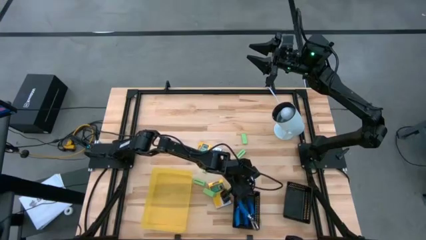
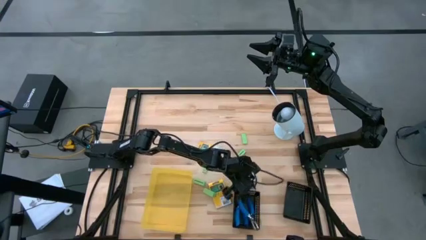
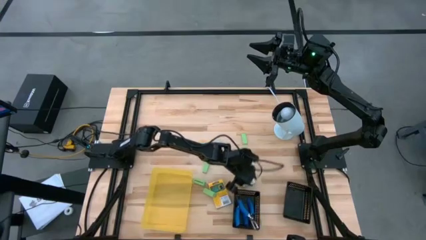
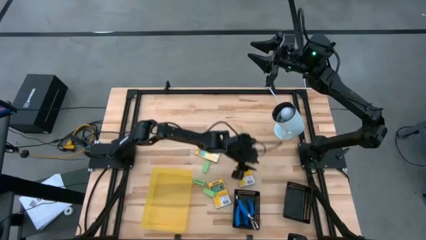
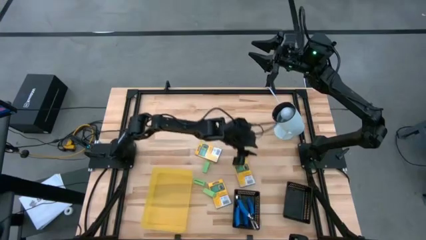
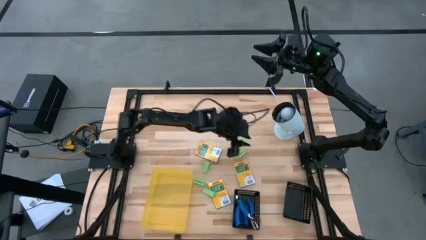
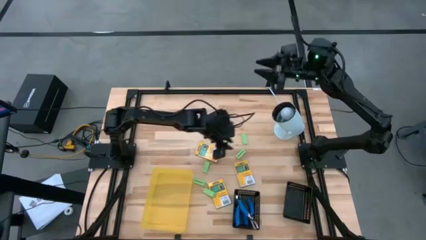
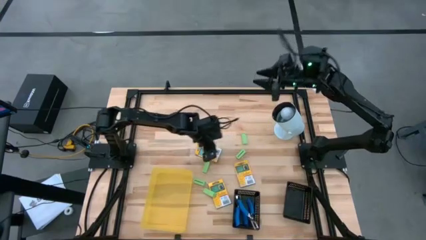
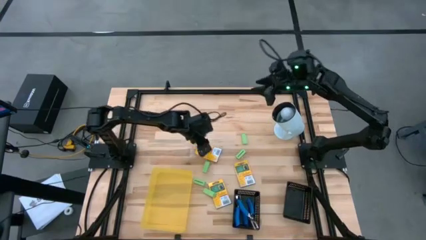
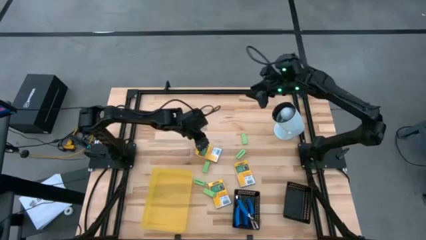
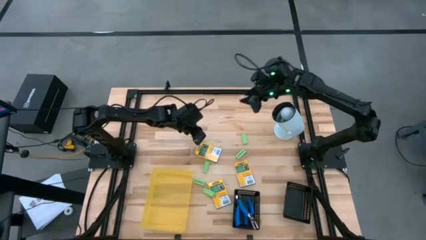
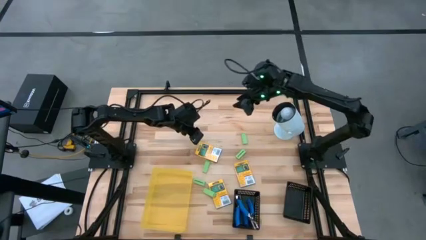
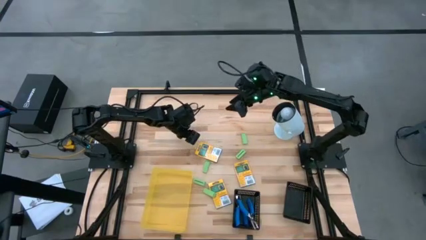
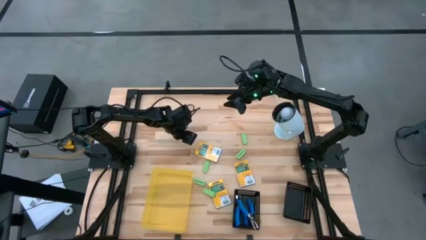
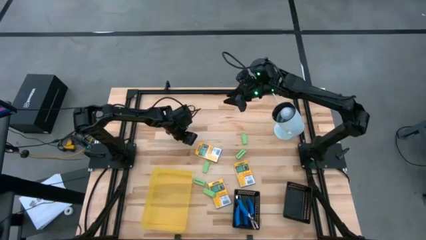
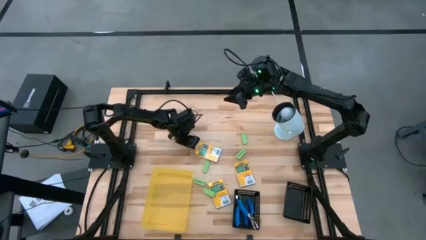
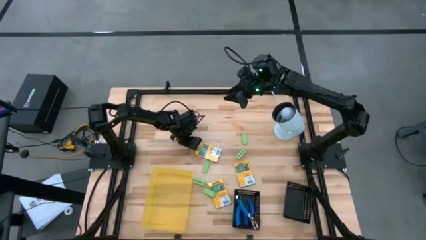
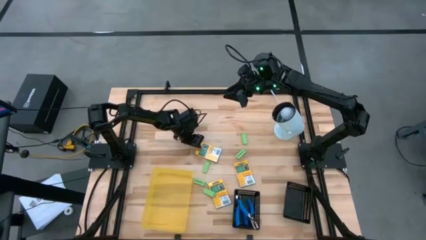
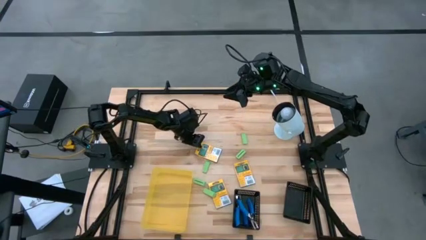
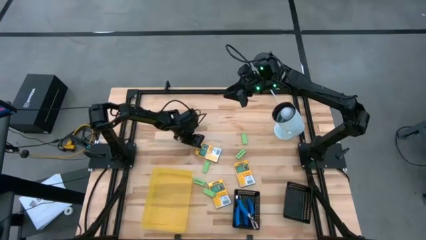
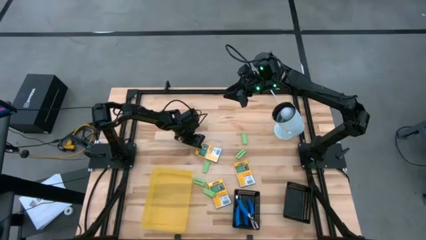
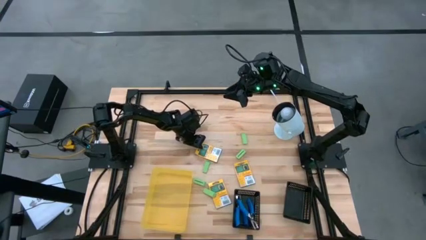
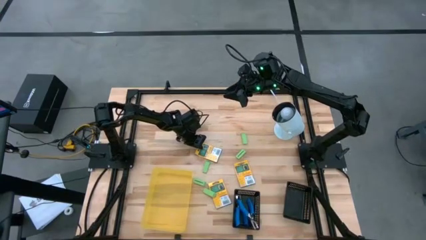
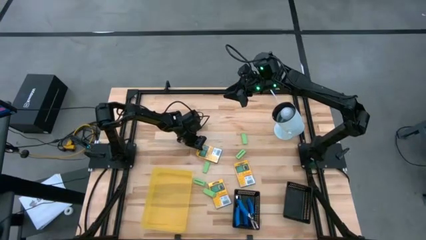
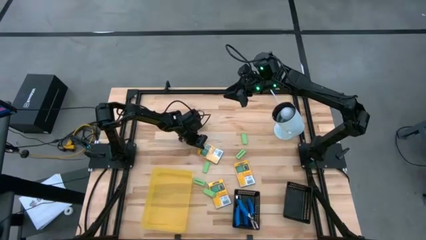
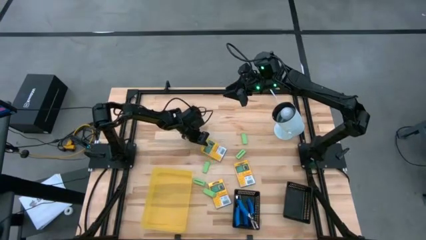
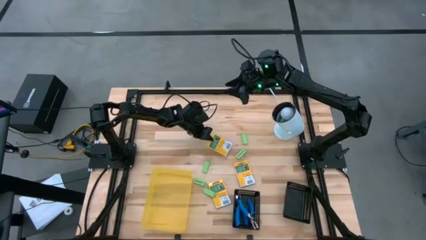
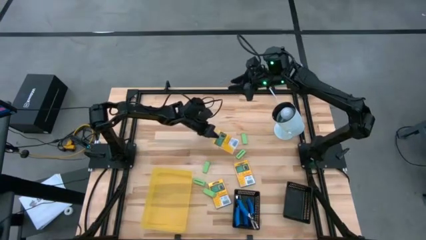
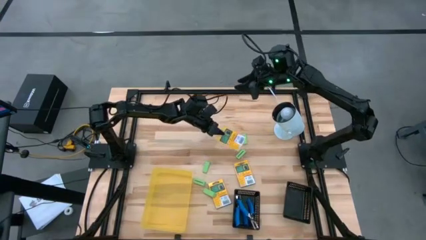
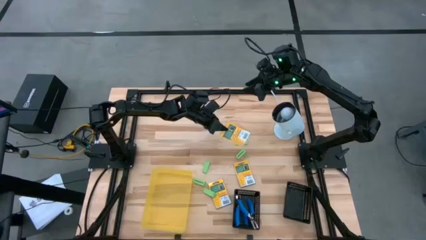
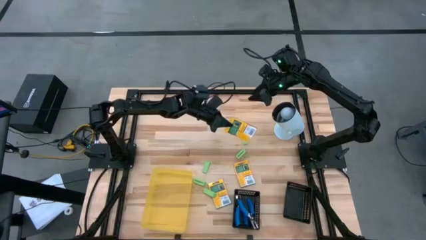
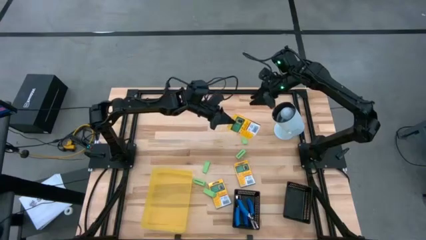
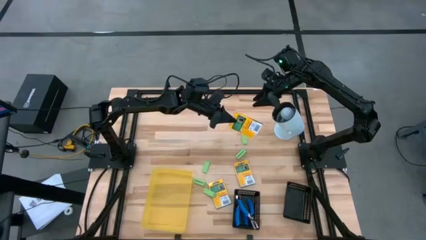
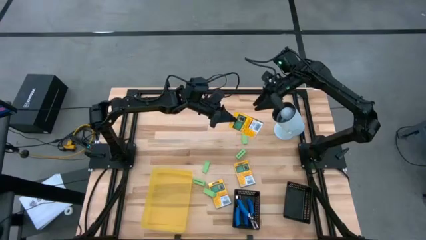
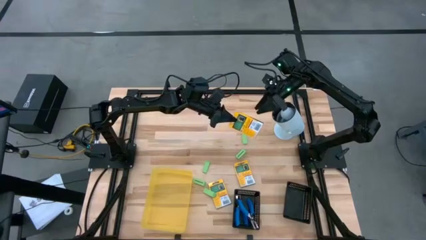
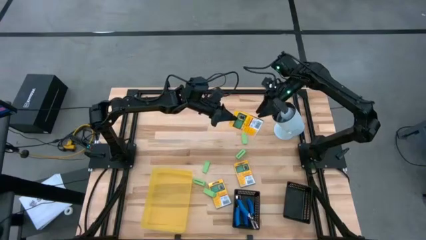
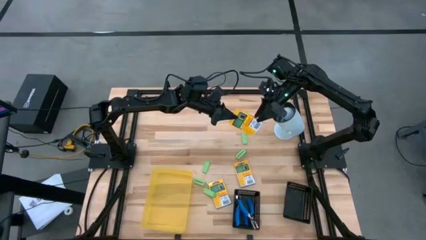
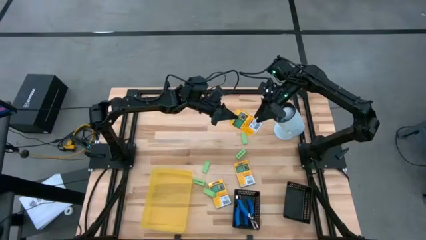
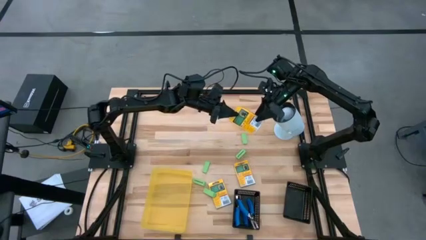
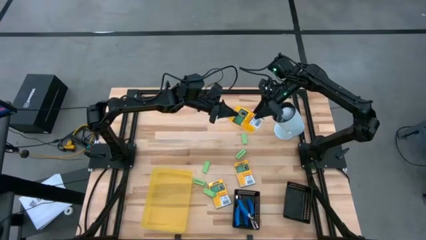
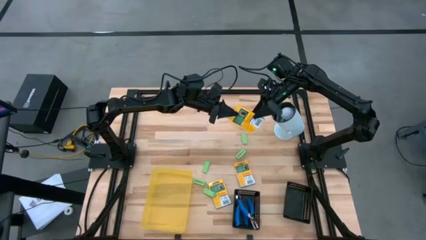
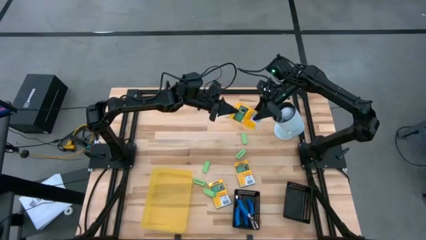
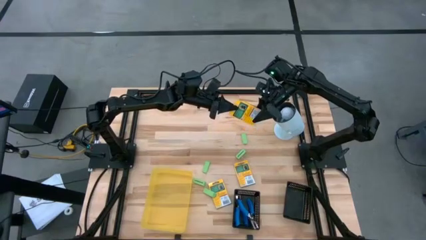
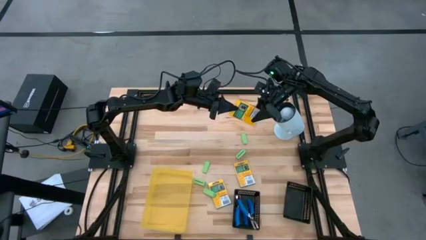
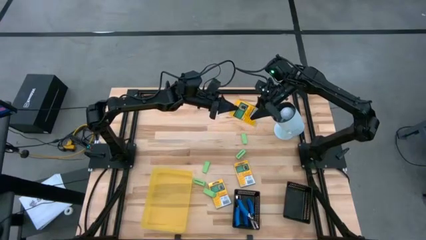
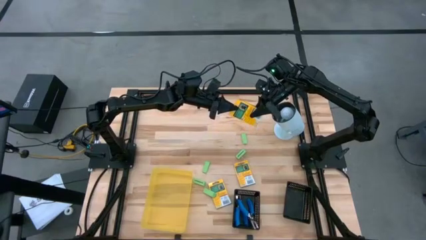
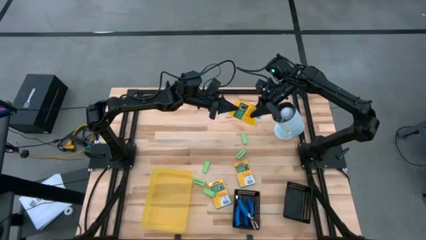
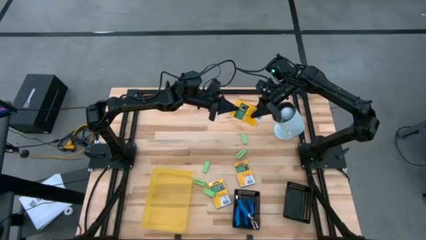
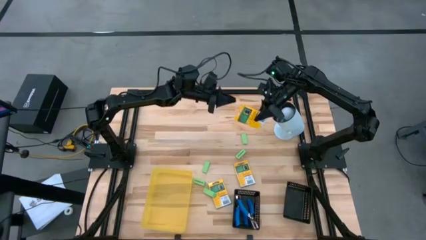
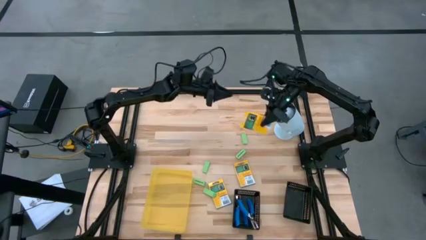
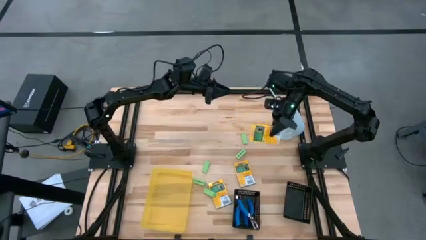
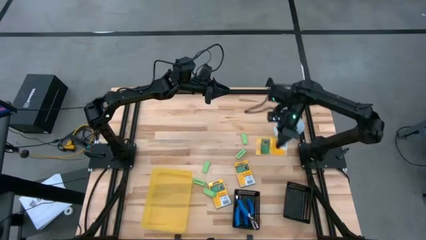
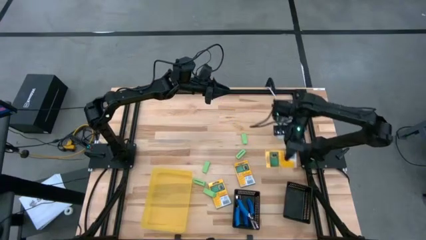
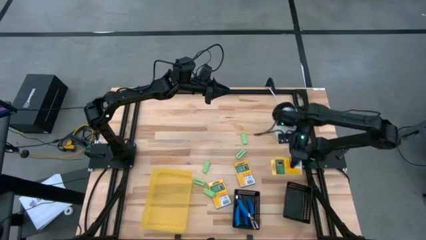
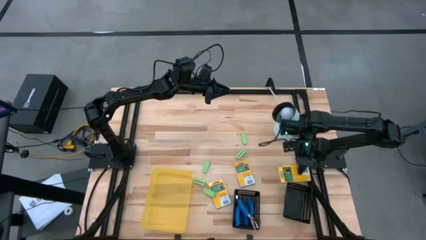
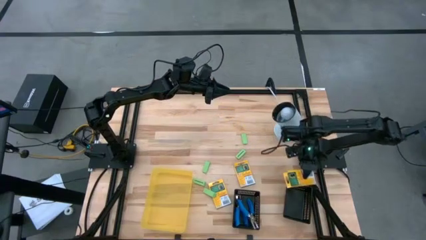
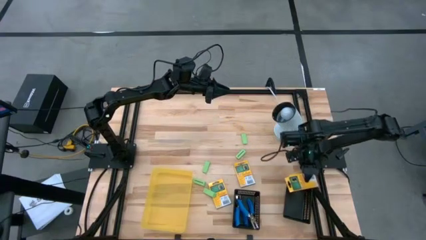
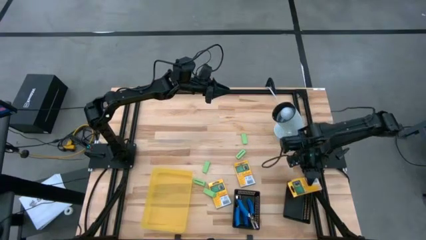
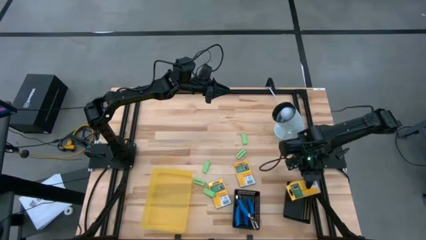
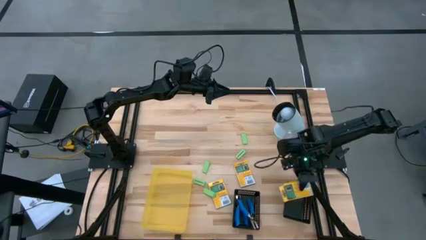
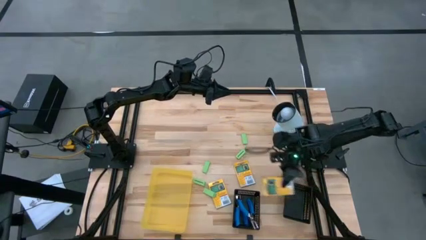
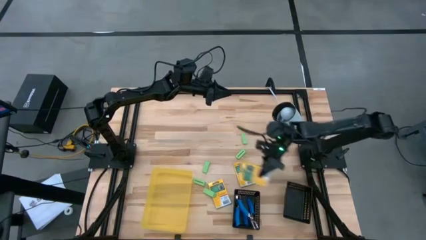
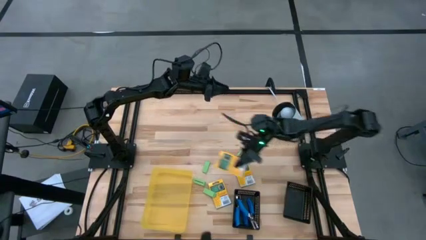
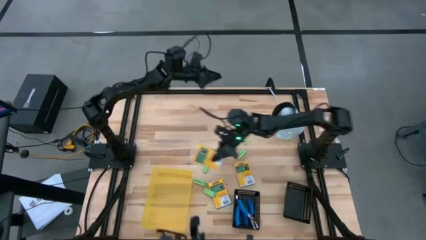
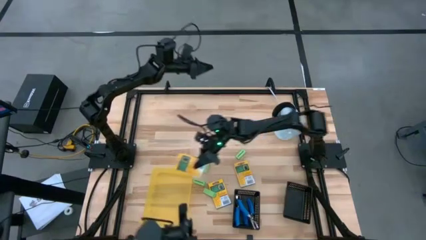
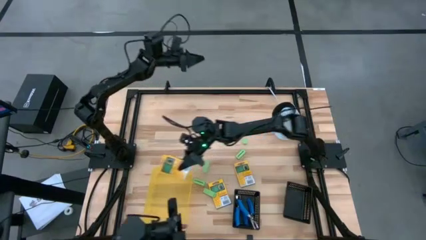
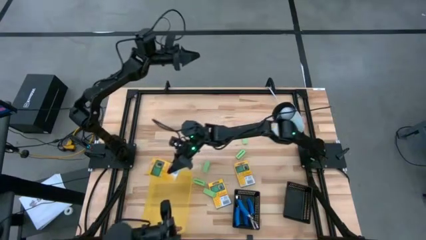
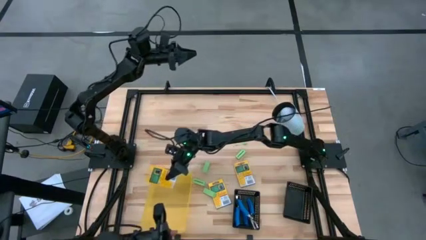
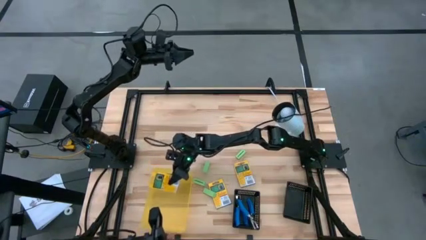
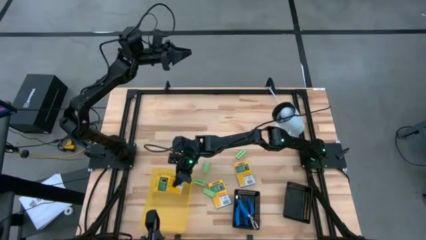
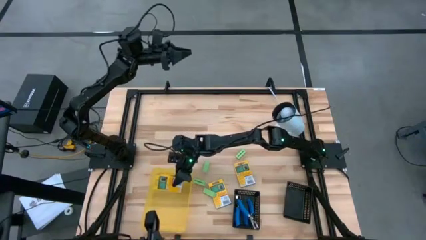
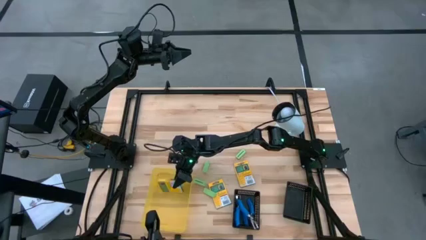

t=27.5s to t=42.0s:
Task: Pick & Place School Supplies
Put the yellow crayon box into the yellow bin

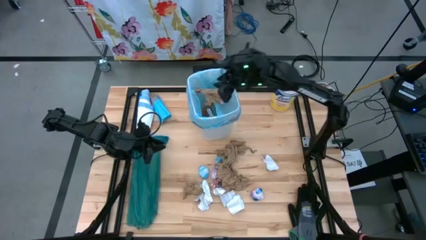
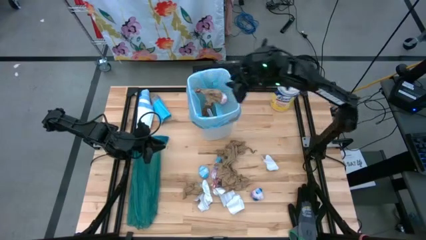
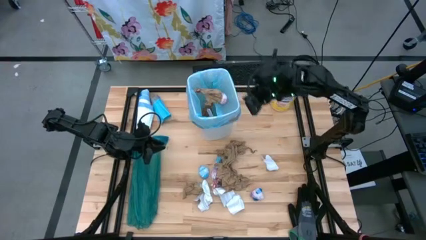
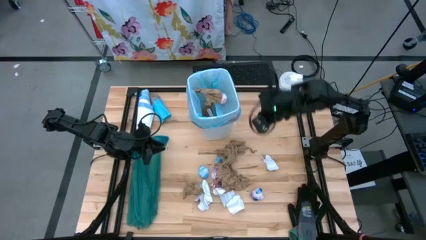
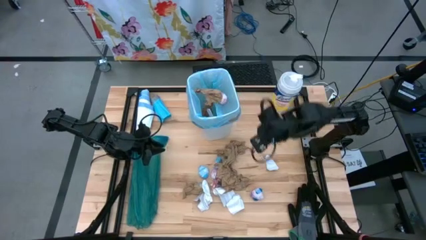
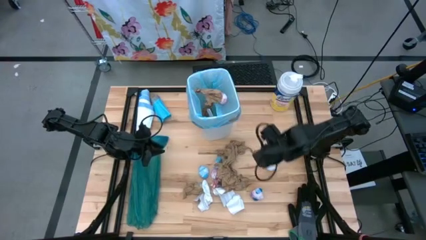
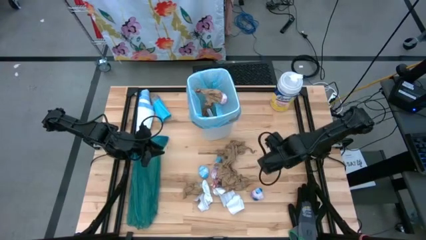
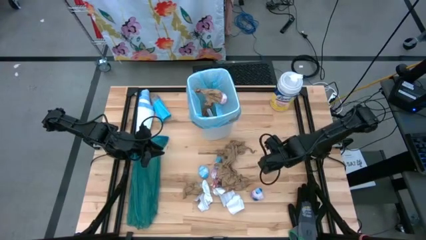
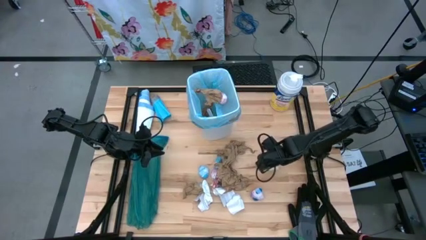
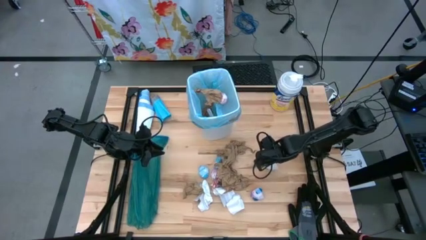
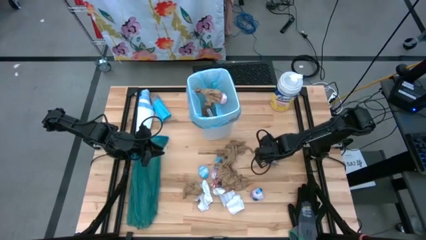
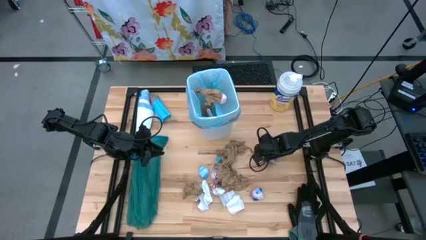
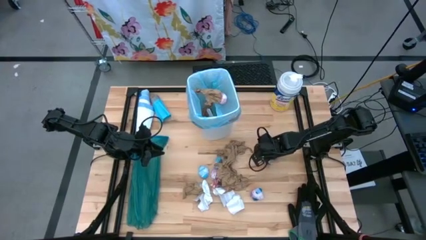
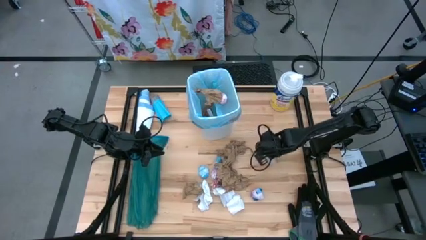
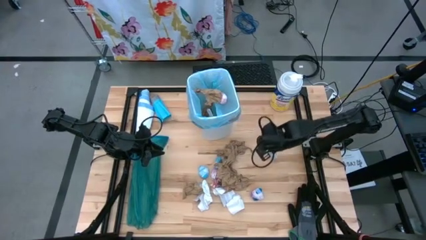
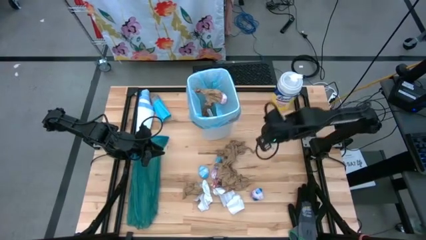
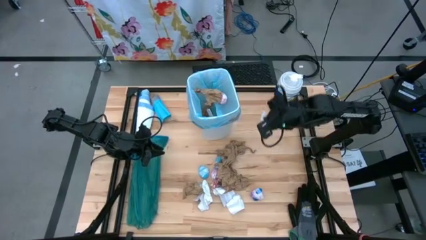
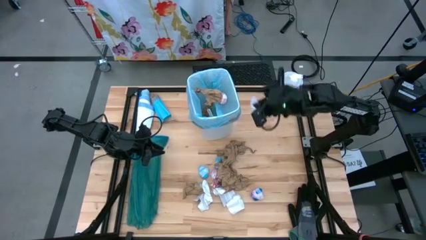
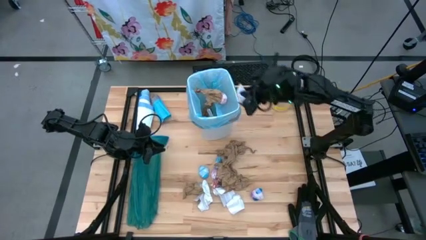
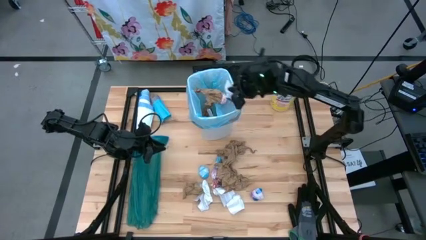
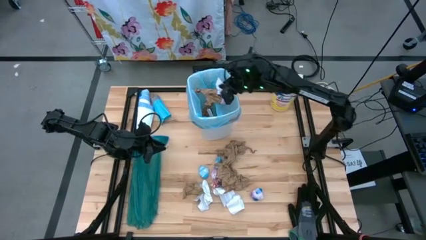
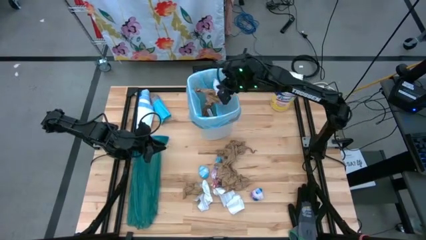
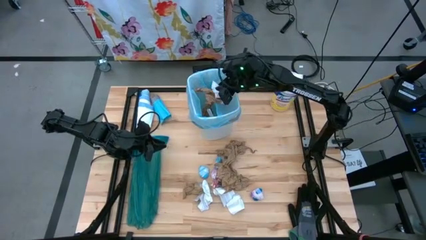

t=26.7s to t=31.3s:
Task: place trash/remove bag and relplace
Put the white paper into the trash bin
